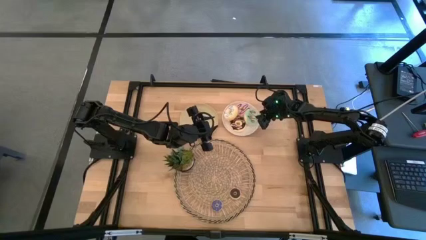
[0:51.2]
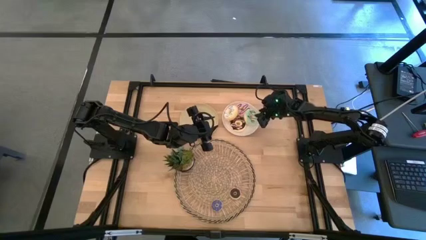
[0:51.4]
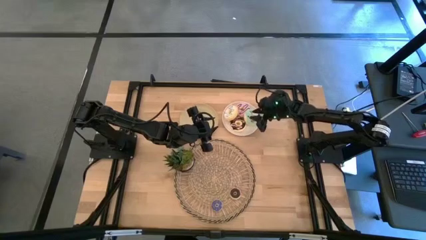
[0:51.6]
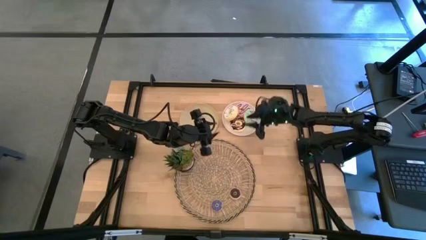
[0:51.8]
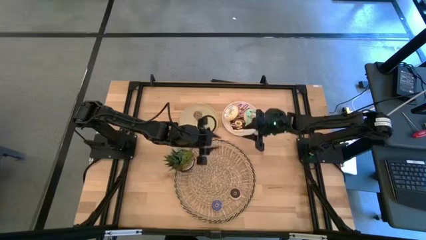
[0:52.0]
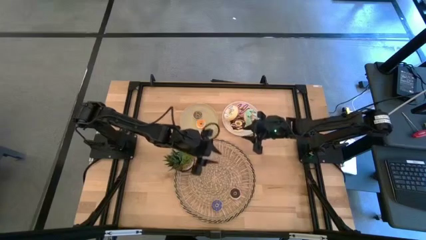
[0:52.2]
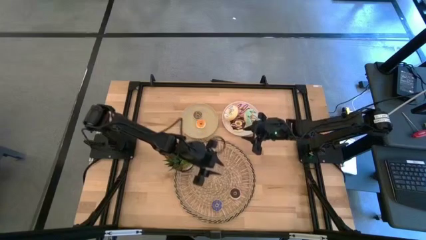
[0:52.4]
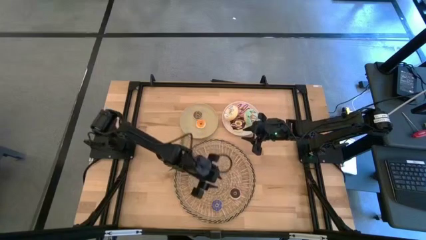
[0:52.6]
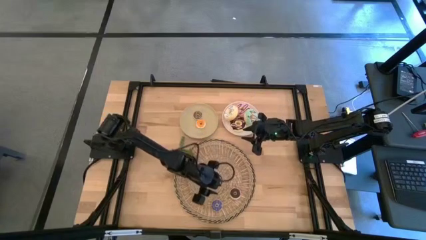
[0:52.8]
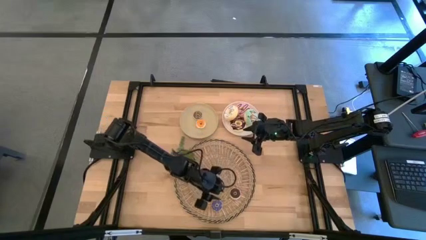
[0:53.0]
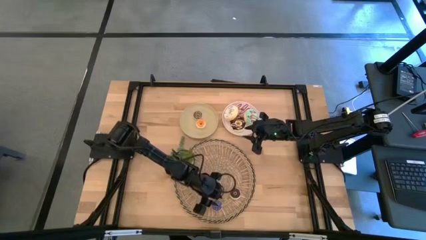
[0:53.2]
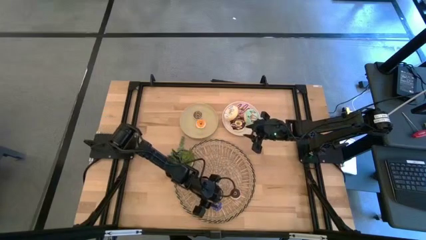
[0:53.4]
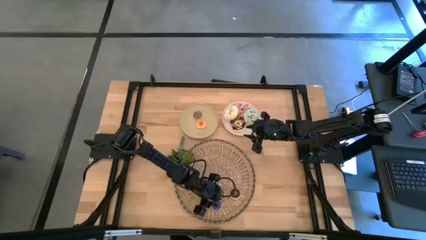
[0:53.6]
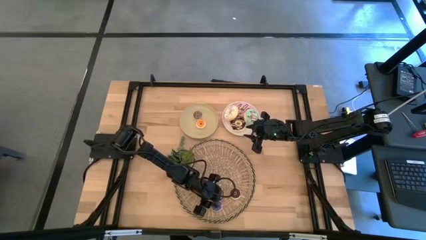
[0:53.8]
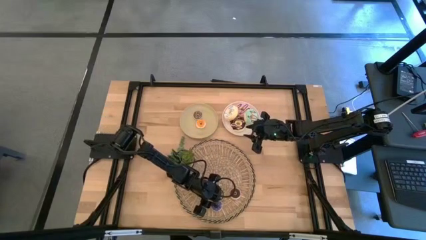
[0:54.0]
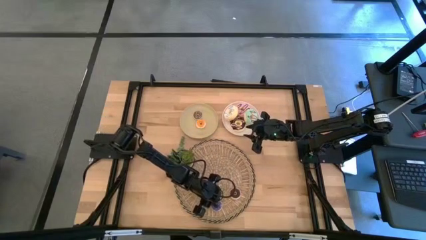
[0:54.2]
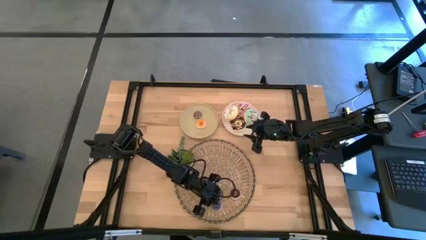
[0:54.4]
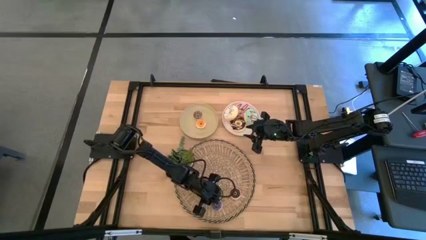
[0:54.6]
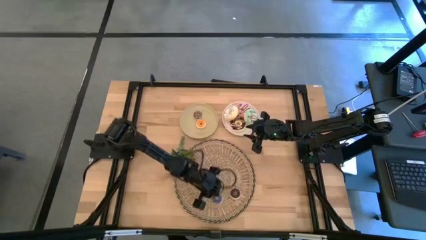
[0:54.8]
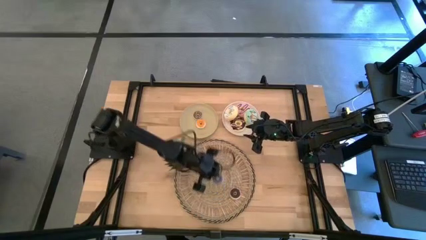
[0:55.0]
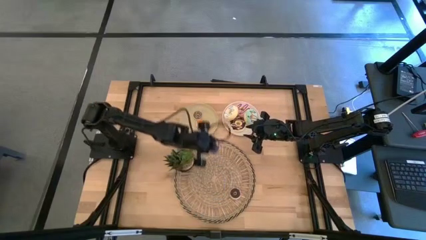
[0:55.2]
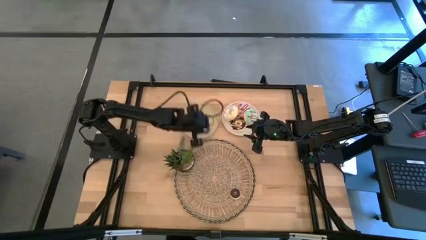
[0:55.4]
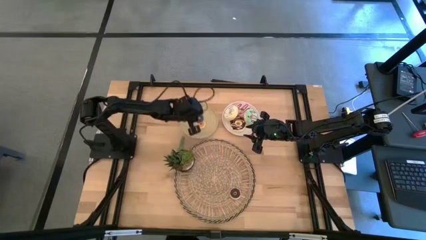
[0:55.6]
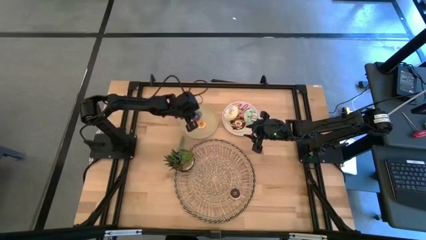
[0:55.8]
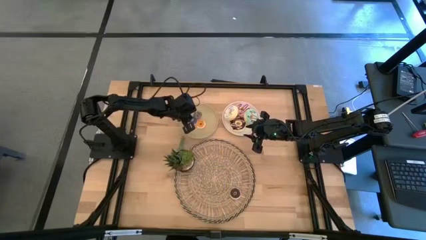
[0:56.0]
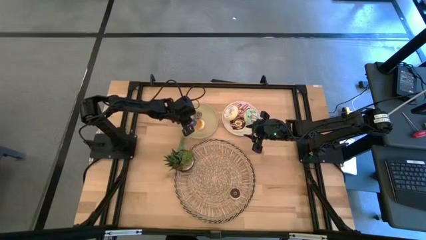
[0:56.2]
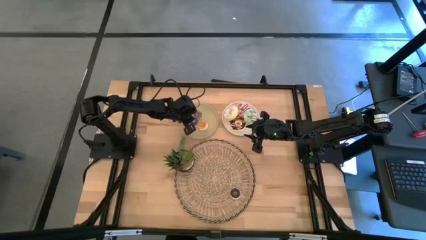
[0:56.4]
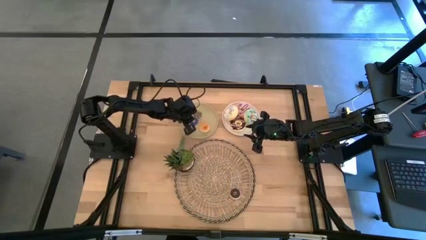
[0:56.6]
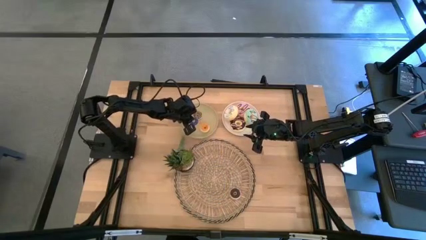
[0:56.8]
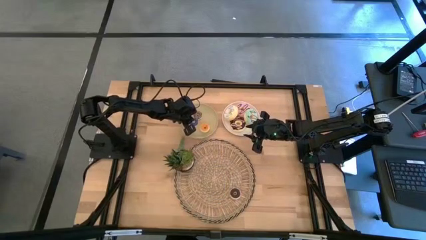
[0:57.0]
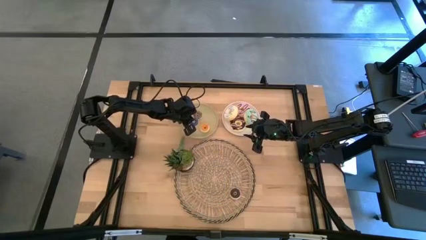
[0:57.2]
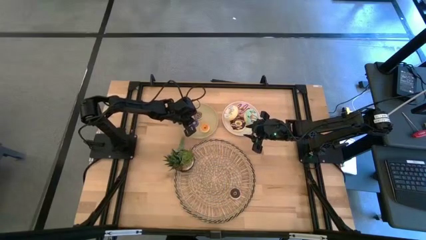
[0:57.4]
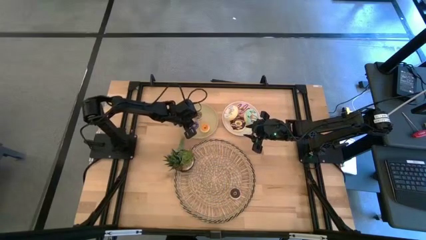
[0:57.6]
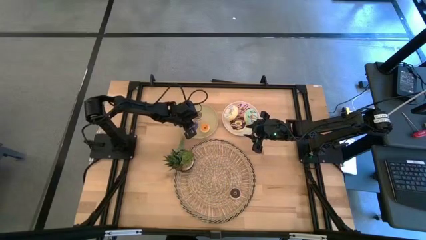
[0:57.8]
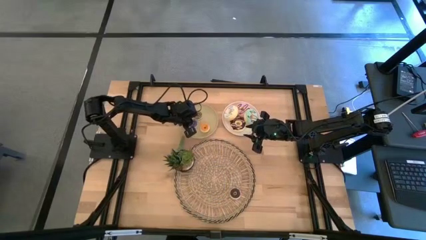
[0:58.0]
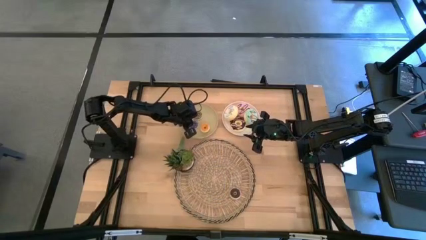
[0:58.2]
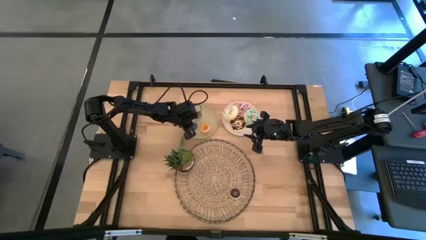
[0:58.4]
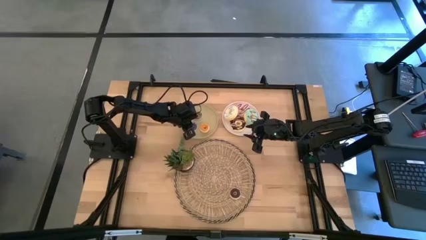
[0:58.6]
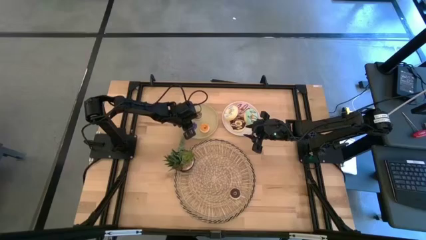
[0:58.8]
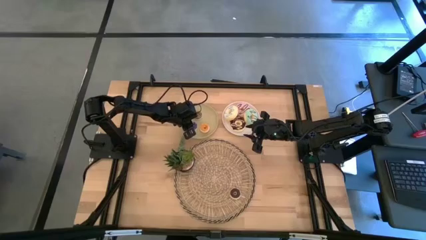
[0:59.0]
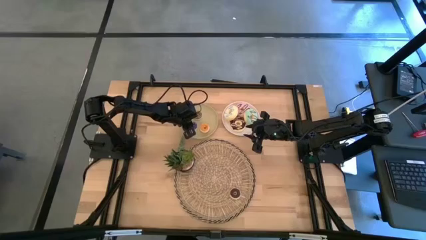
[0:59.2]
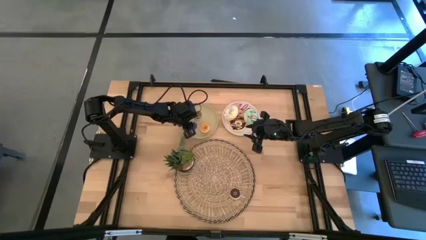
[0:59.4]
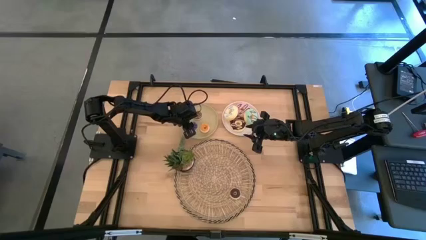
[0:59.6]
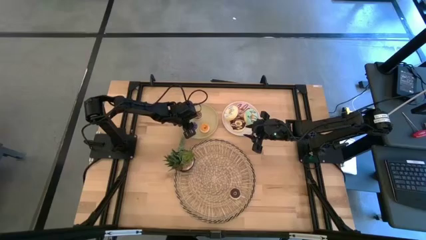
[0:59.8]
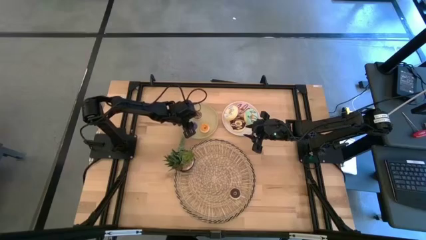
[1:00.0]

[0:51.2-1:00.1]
Task: Pick & Place donuts
Put the small blue donut on the brown plate

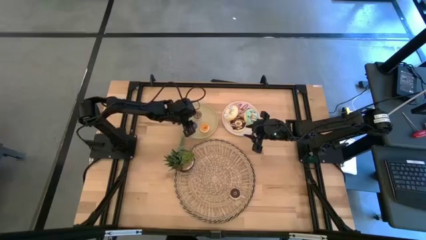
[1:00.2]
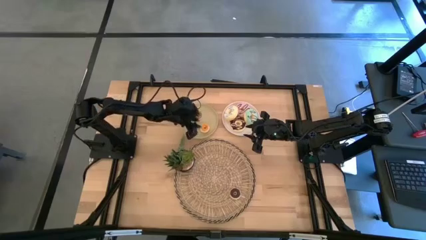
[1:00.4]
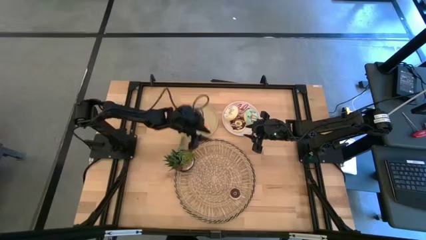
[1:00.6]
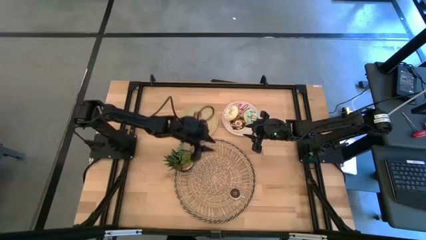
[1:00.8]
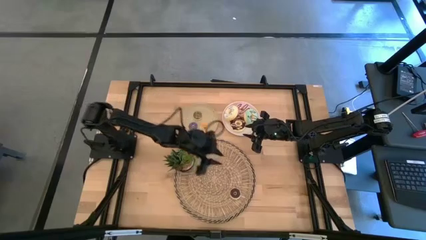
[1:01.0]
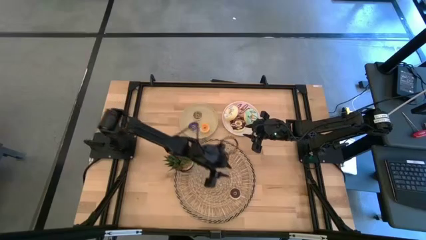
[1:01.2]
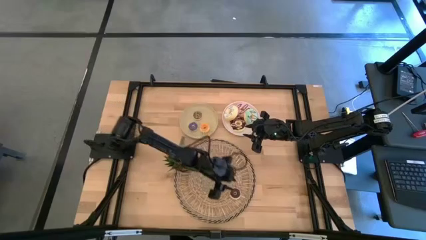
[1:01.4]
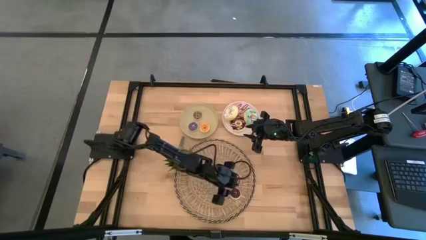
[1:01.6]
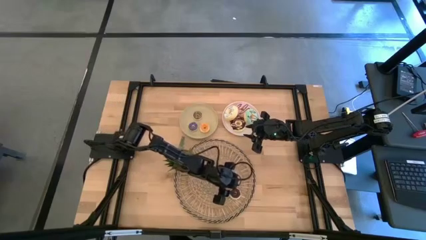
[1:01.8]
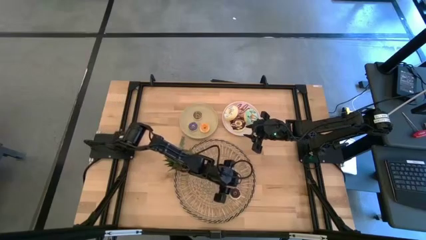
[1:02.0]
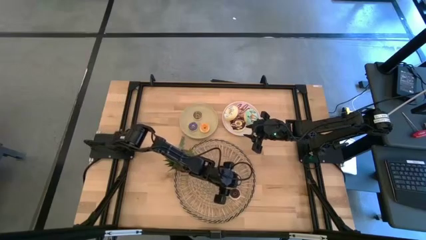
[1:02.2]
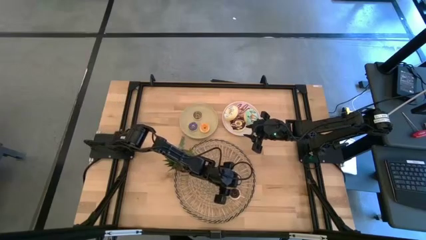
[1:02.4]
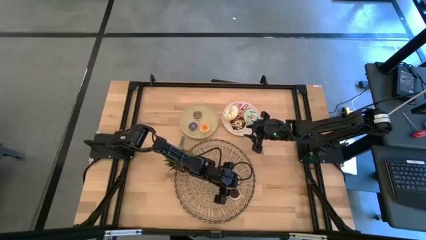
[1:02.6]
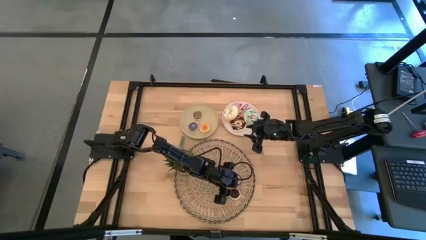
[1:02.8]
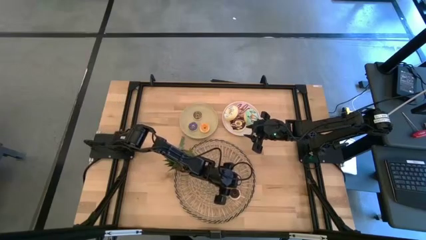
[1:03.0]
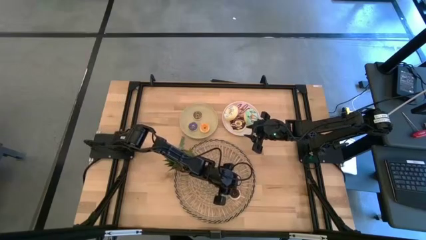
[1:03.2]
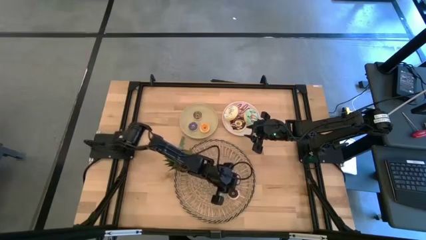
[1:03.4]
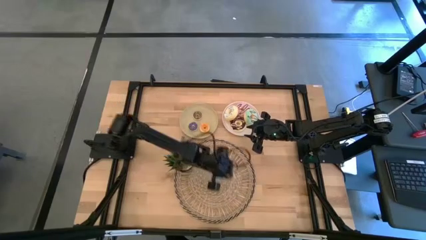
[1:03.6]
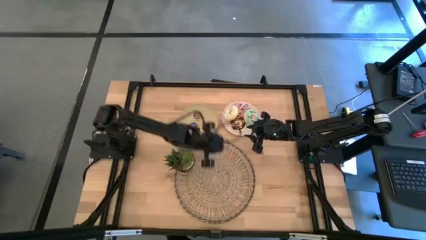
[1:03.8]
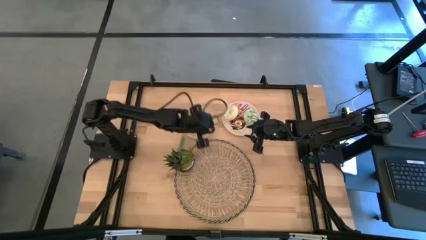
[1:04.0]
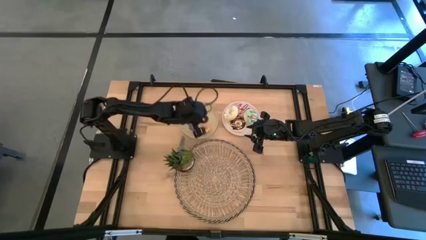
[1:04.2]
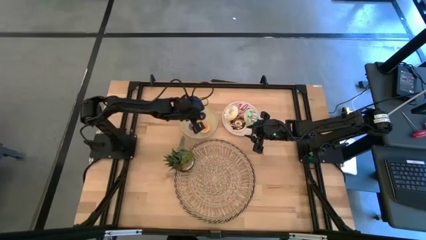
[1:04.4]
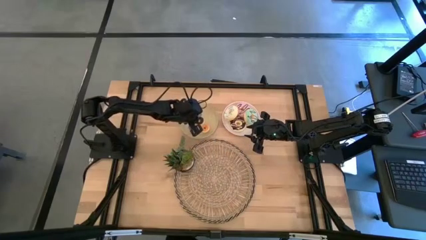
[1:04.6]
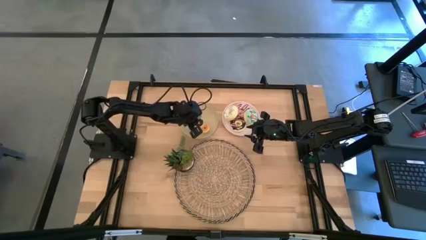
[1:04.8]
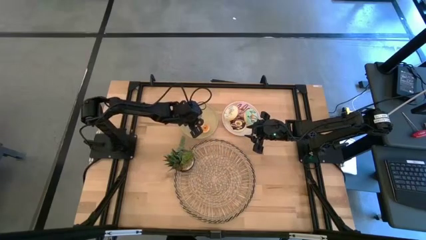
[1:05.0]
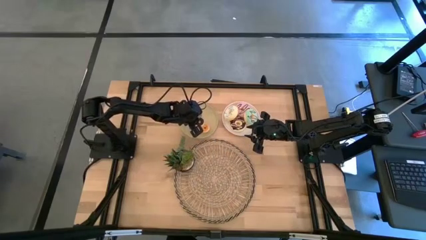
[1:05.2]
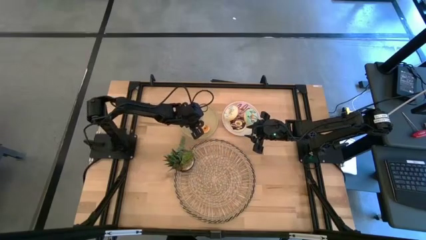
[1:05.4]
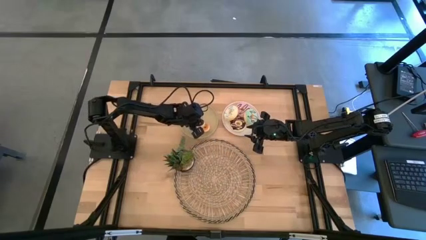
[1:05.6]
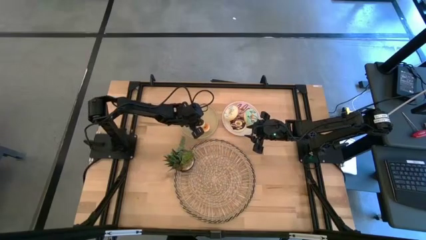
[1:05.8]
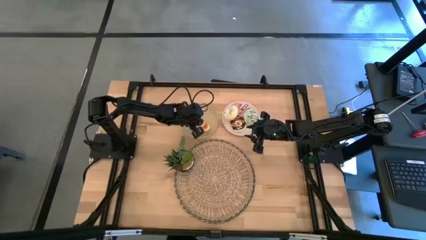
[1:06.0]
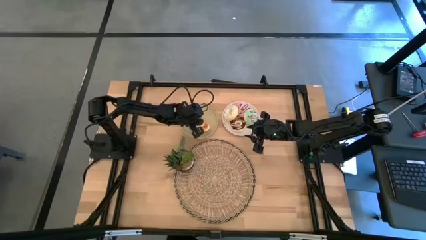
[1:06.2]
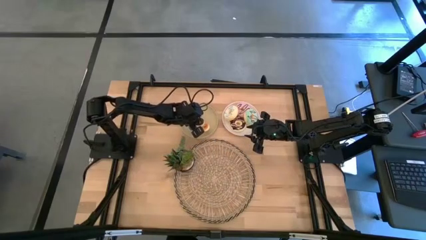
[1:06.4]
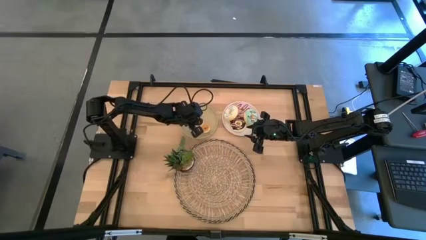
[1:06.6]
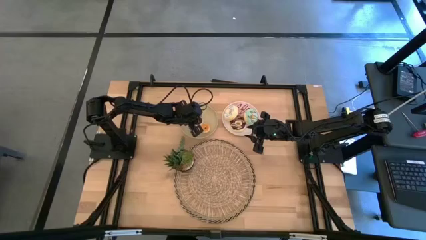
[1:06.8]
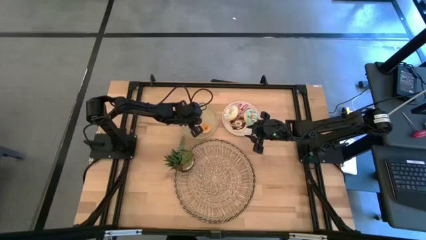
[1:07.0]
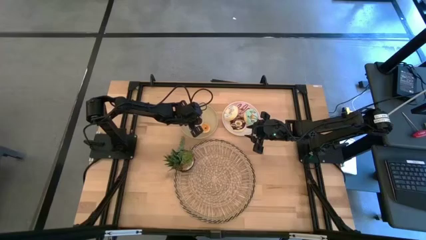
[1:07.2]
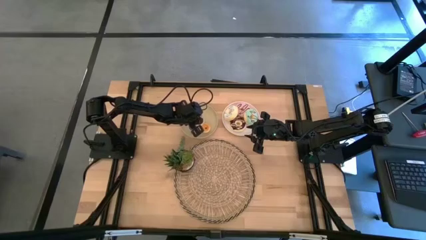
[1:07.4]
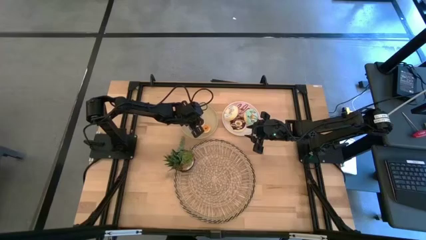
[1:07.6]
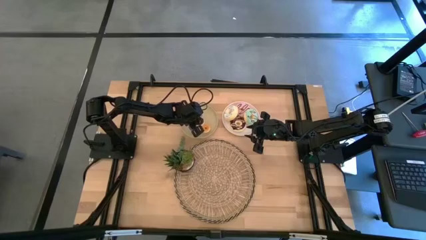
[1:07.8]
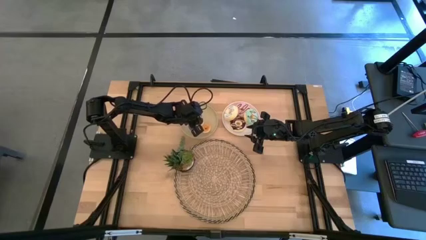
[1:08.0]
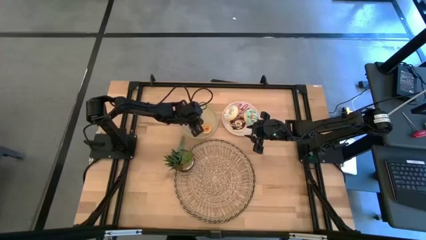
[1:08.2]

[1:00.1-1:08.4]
Put the small dark brown donut on the brown plate
